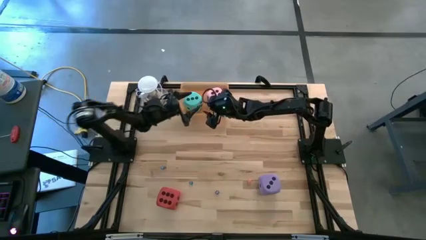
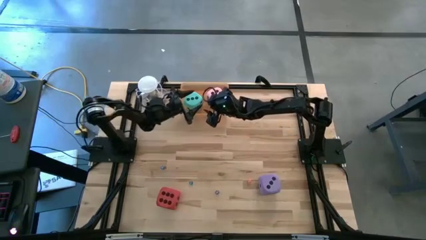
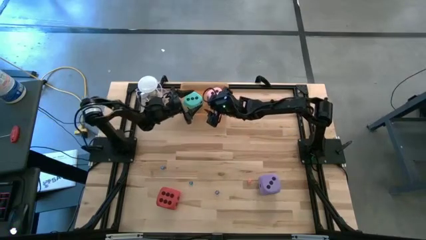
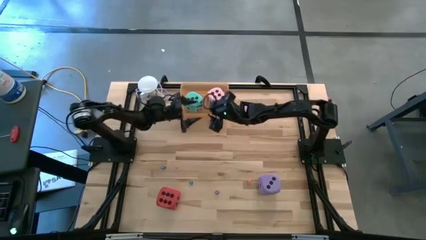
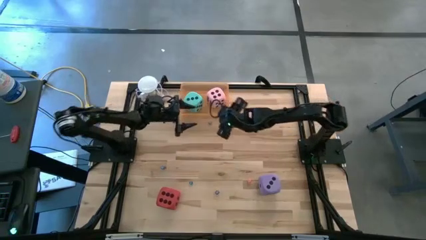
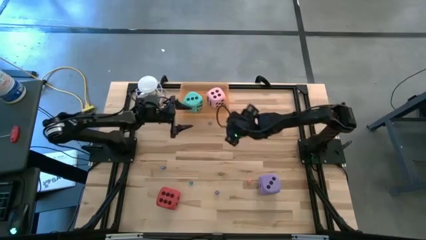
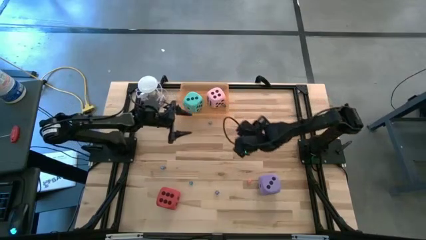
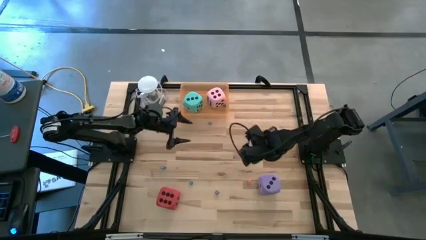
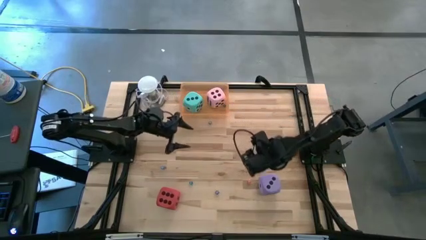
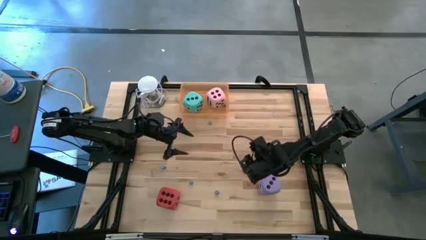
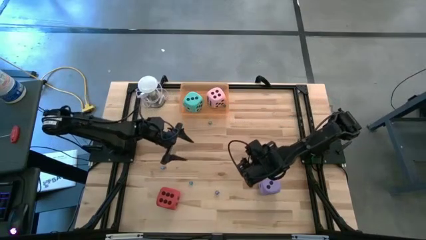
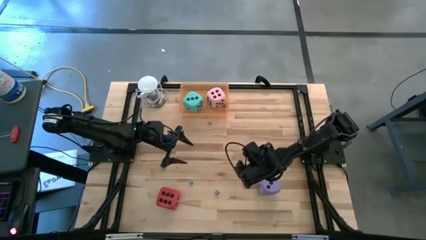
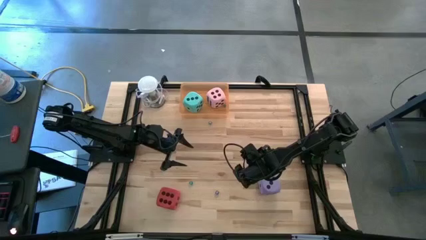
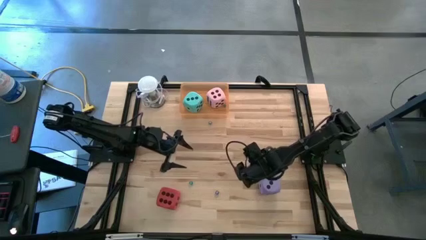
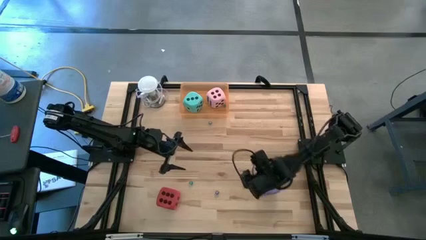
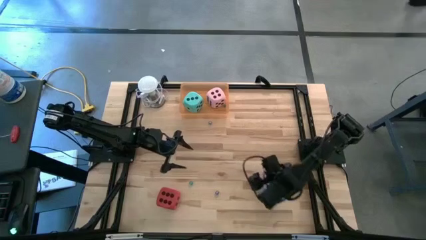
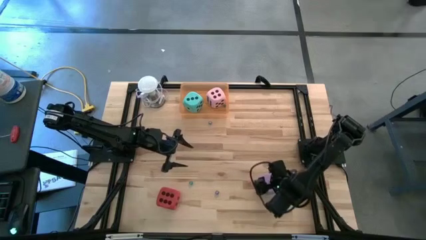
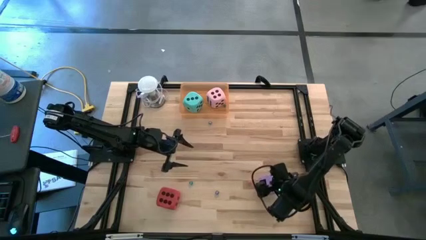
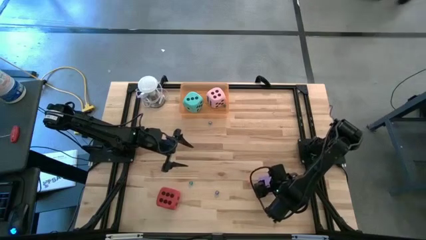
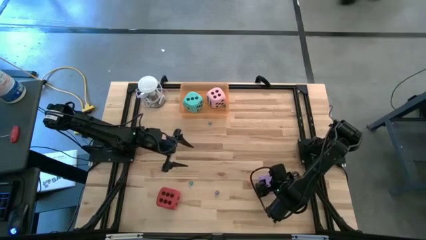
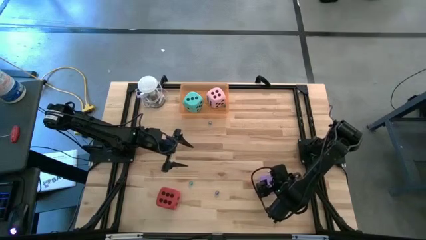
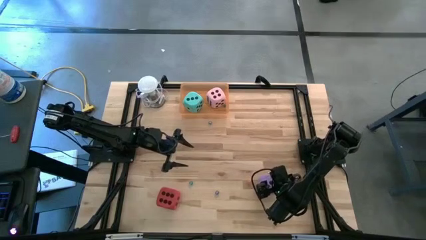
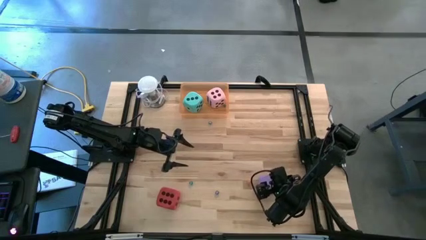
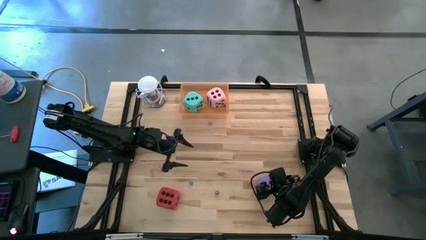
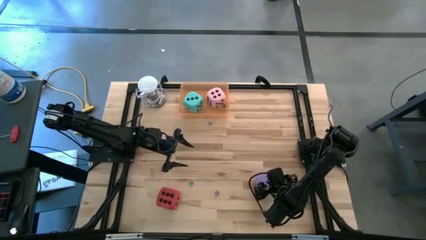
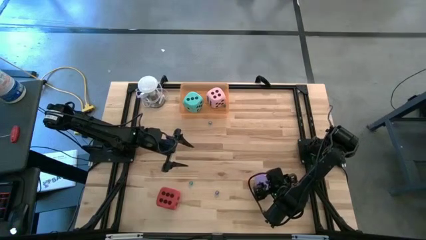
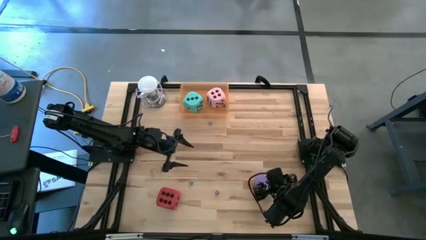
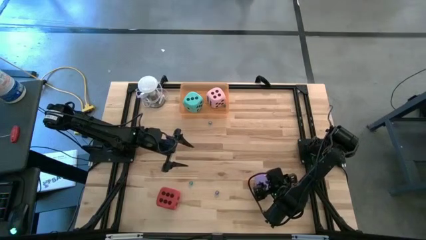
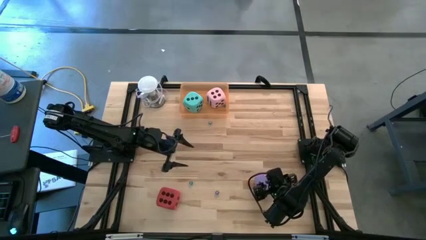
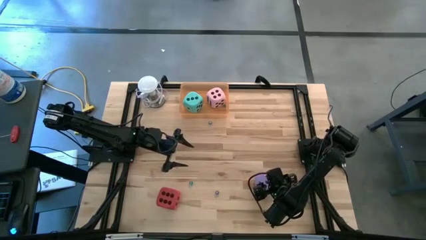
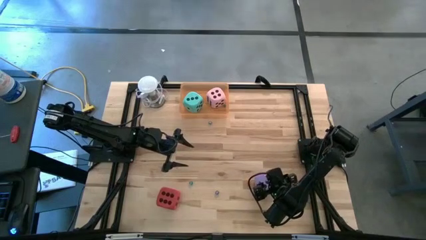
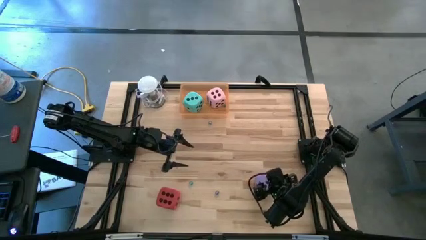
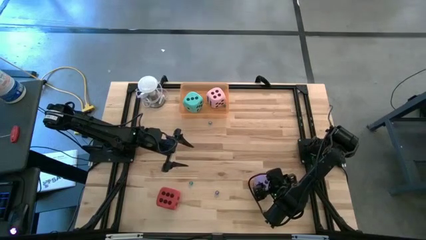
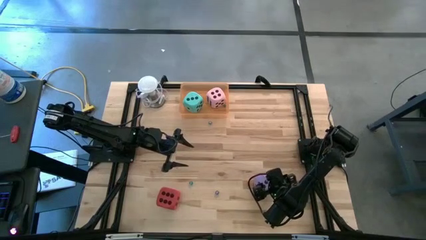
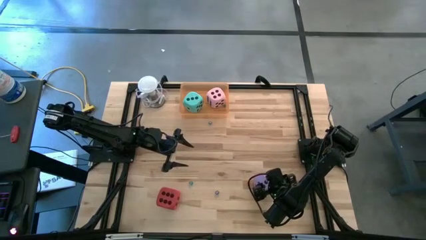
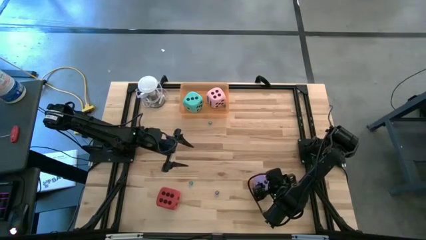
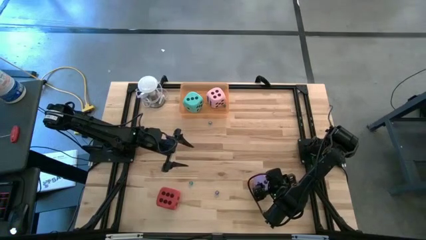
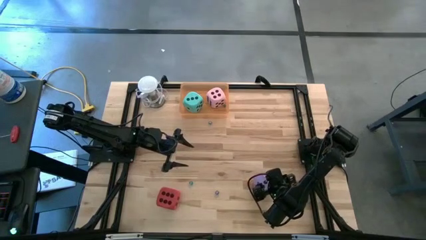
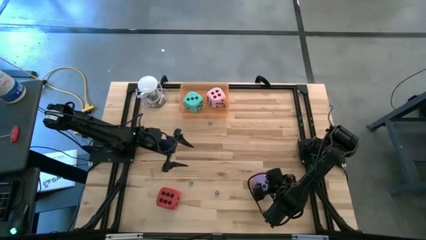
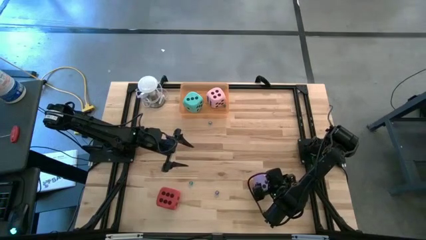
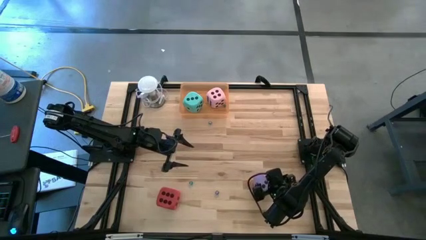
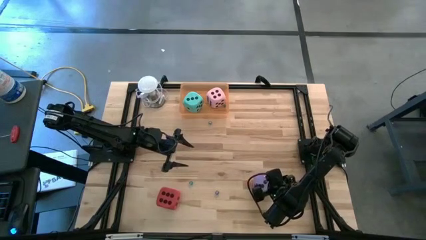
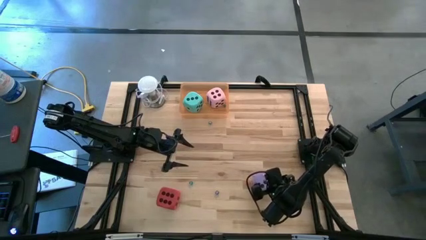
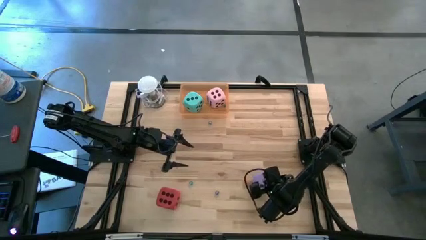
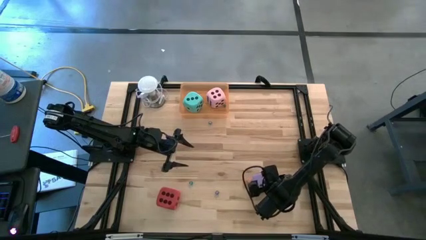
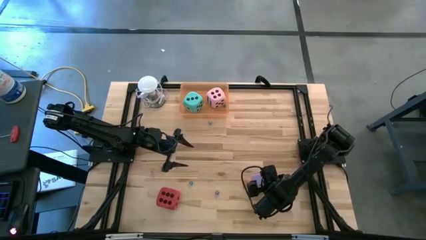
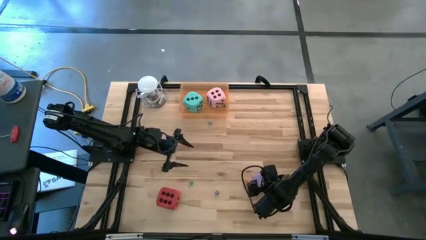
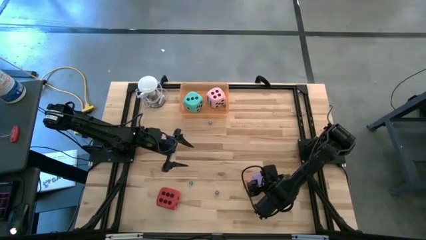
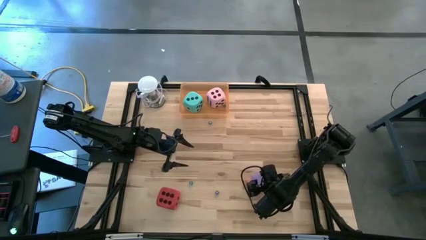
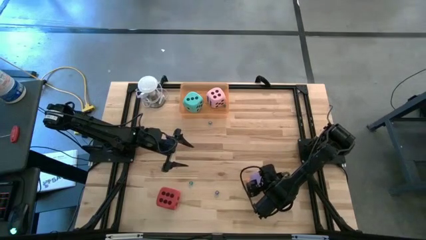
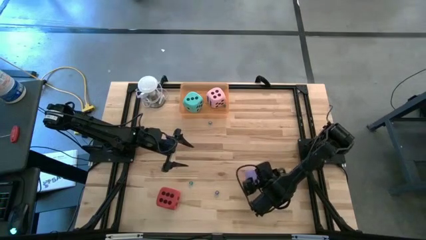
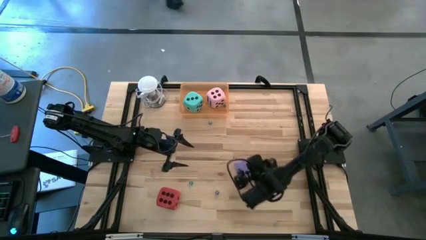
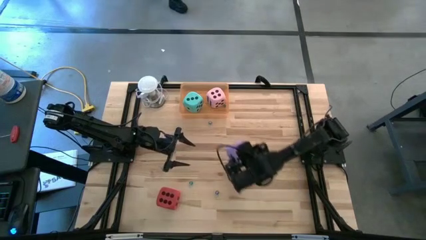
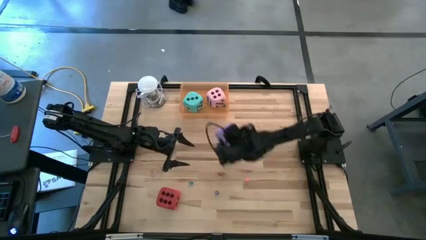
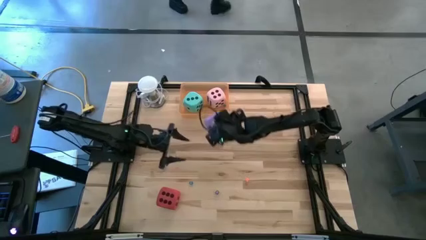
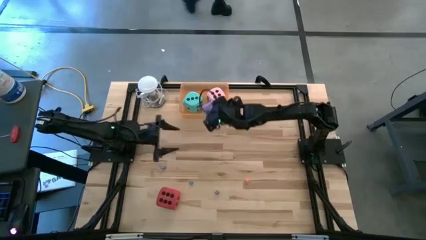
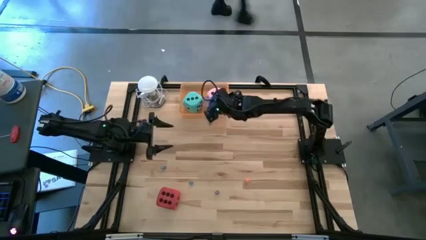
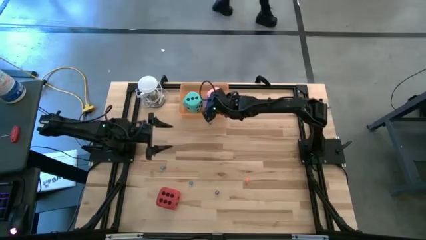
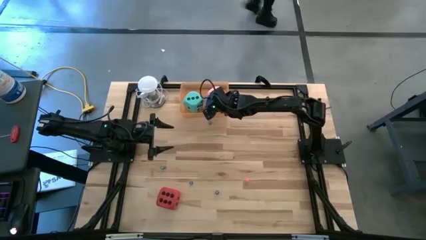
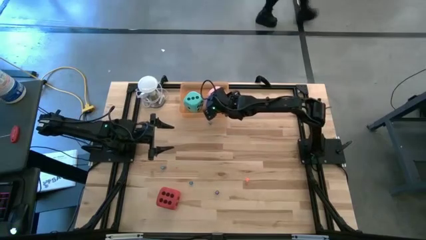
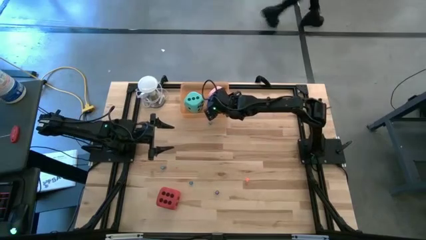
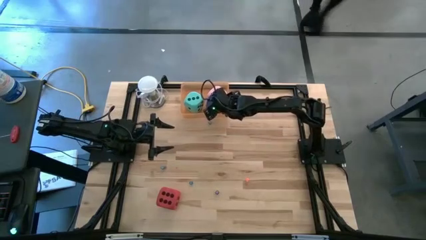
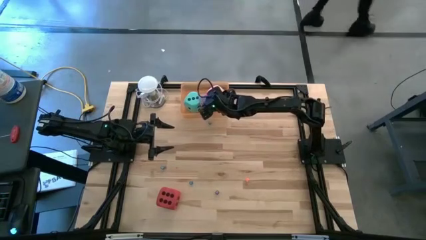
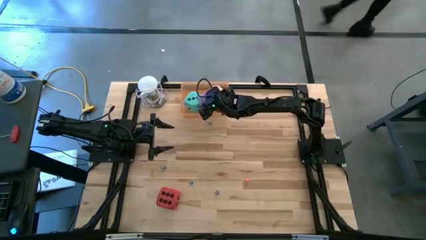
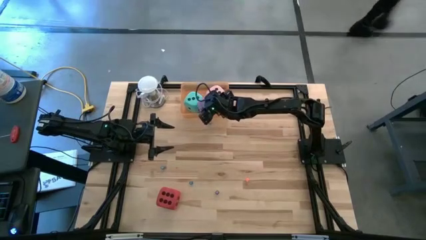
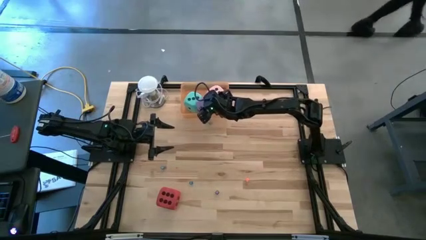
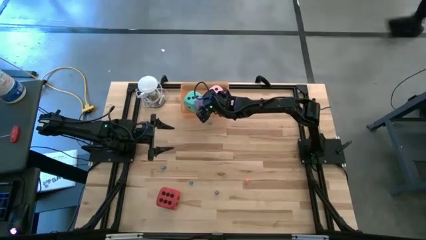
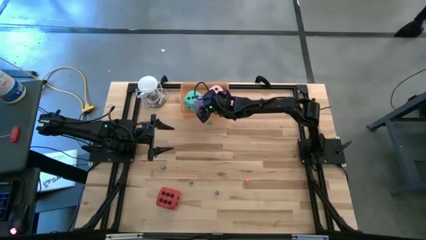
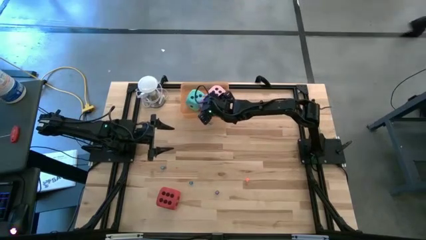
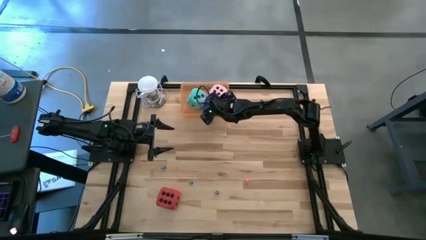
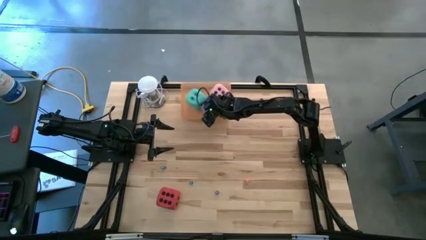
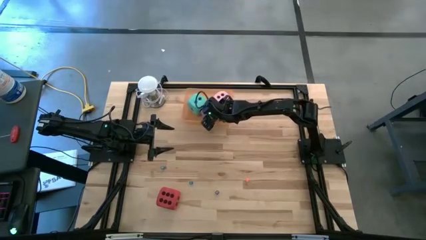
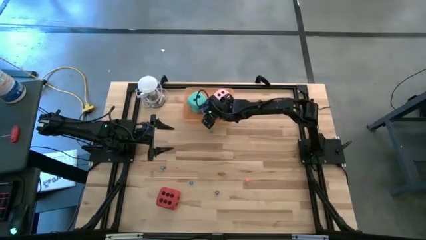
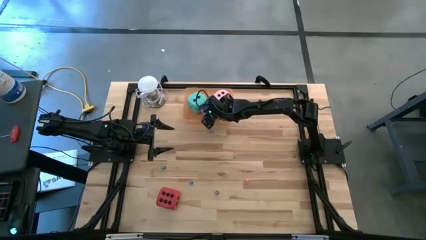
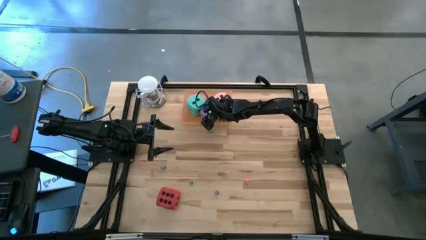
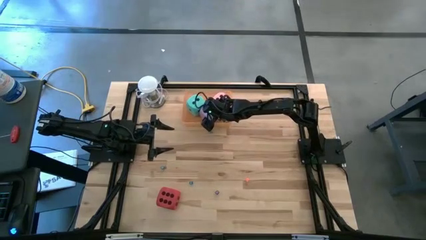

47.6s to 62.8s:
Task: Pick & Place Dice
Put the large purple die into the bin
